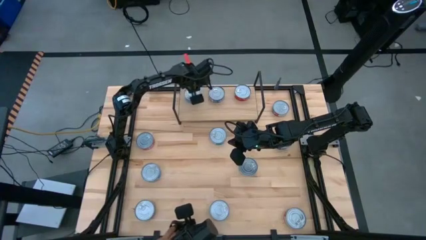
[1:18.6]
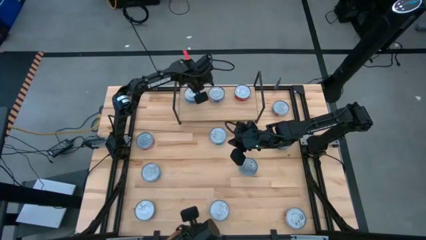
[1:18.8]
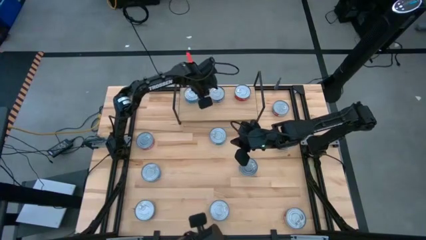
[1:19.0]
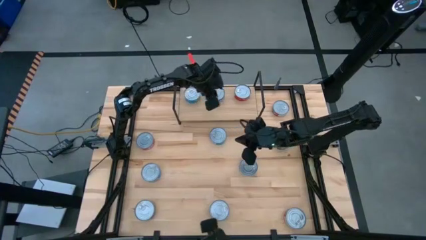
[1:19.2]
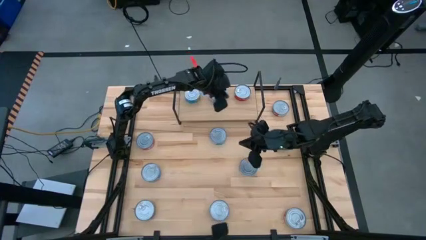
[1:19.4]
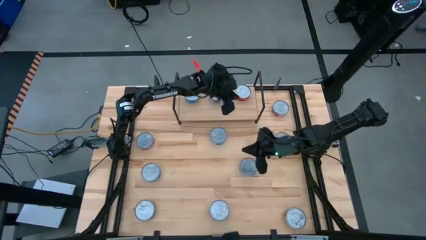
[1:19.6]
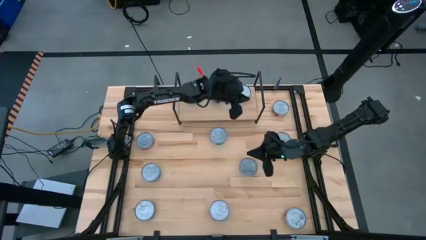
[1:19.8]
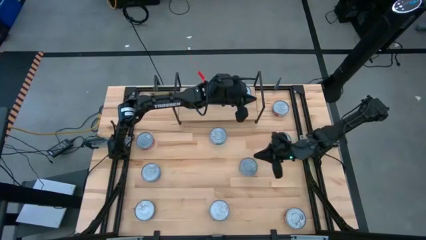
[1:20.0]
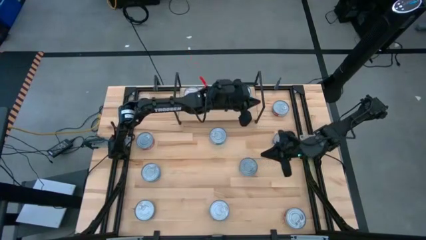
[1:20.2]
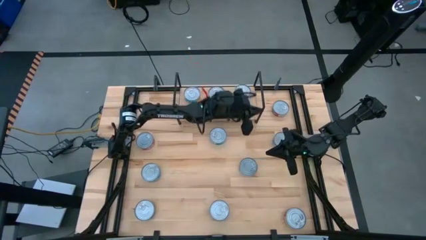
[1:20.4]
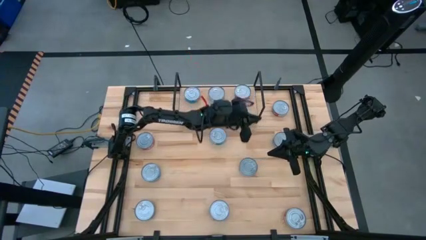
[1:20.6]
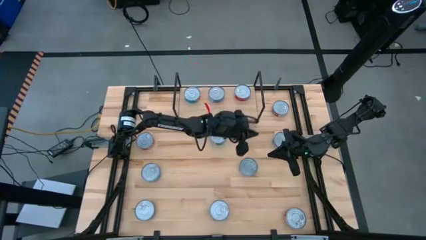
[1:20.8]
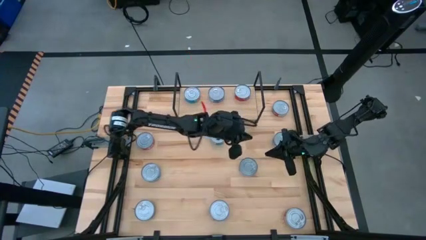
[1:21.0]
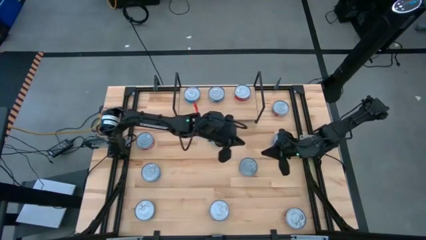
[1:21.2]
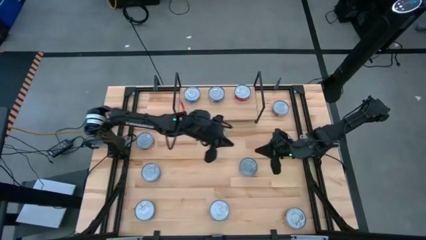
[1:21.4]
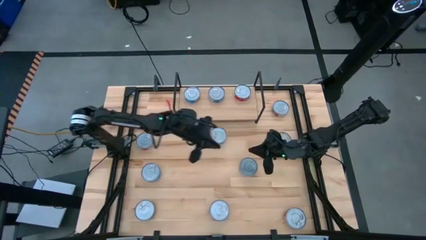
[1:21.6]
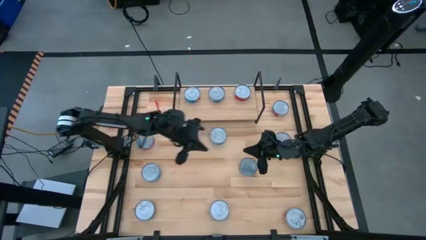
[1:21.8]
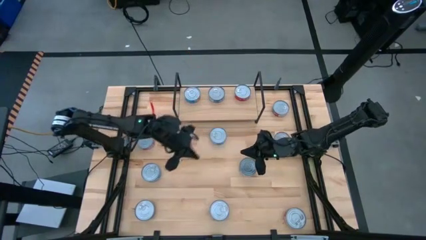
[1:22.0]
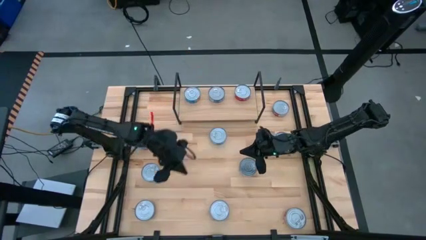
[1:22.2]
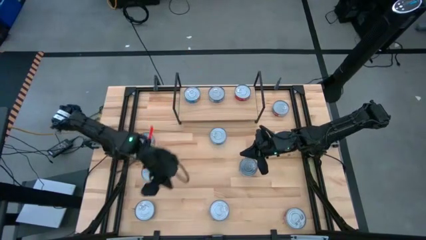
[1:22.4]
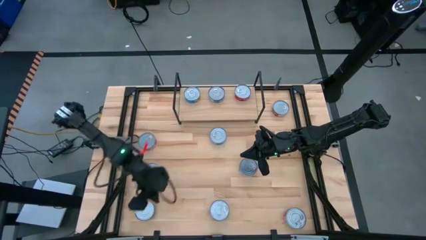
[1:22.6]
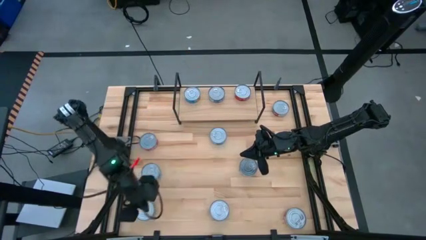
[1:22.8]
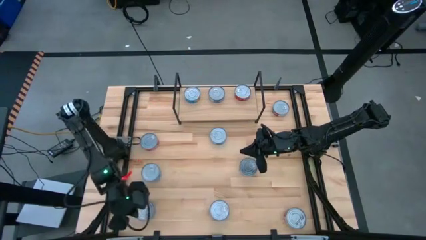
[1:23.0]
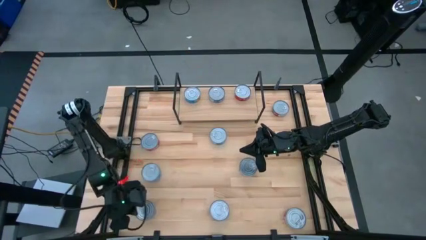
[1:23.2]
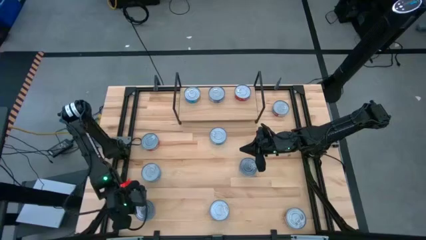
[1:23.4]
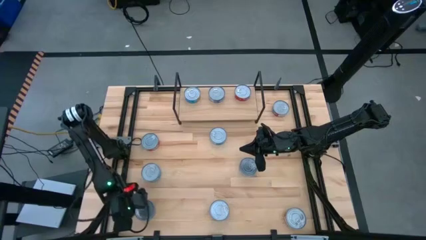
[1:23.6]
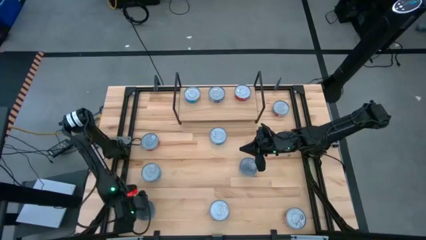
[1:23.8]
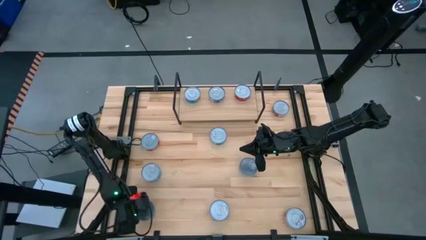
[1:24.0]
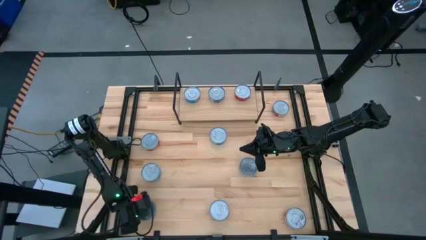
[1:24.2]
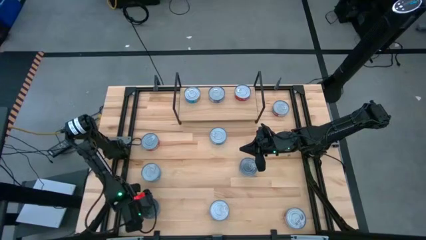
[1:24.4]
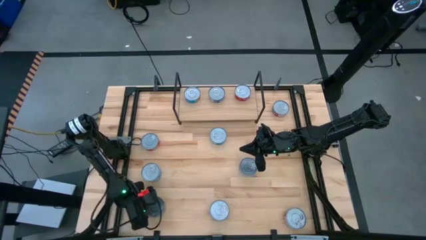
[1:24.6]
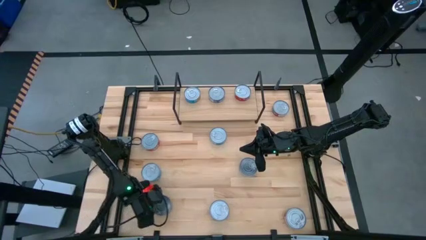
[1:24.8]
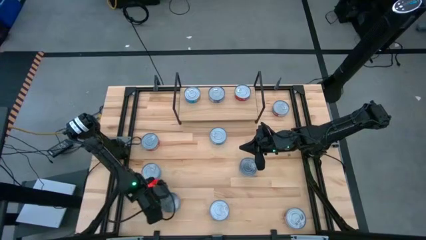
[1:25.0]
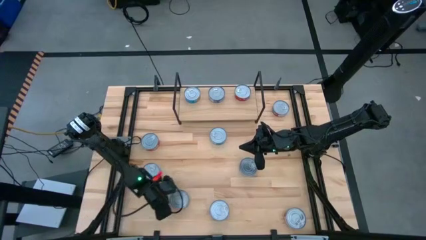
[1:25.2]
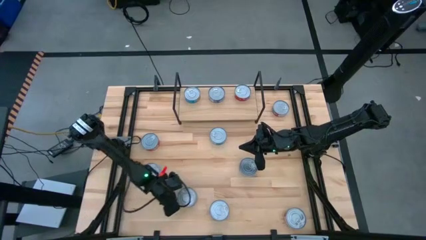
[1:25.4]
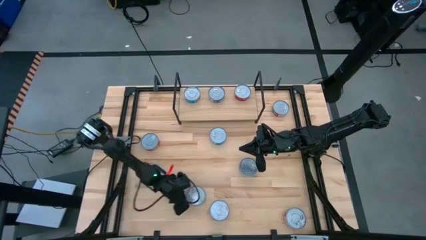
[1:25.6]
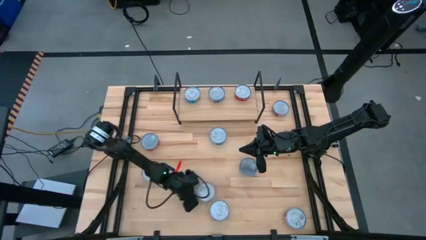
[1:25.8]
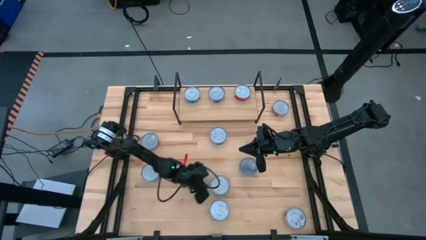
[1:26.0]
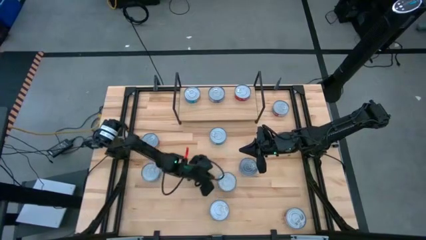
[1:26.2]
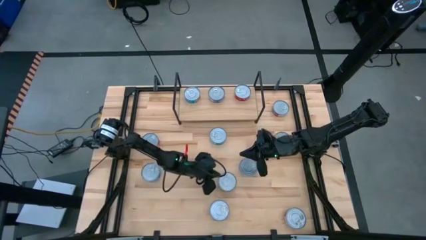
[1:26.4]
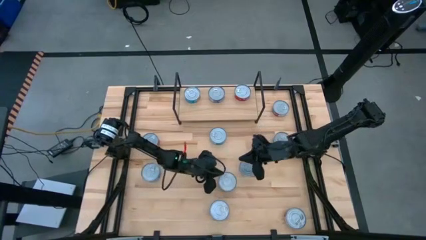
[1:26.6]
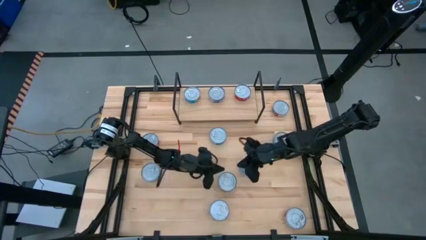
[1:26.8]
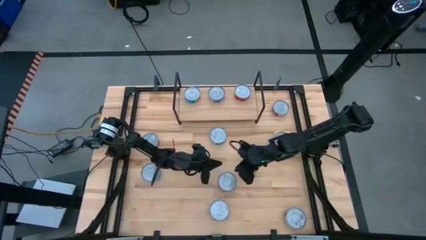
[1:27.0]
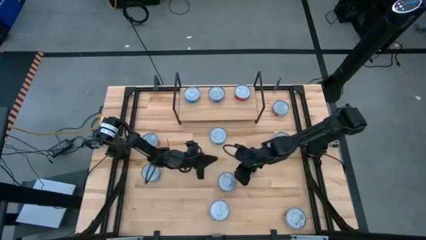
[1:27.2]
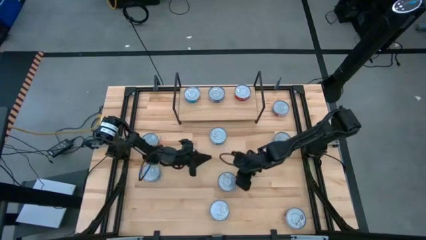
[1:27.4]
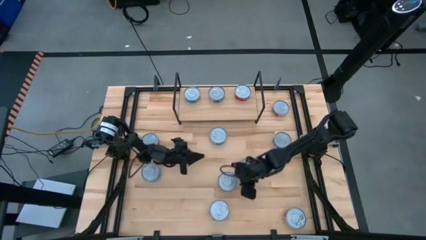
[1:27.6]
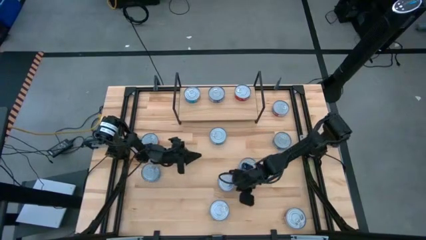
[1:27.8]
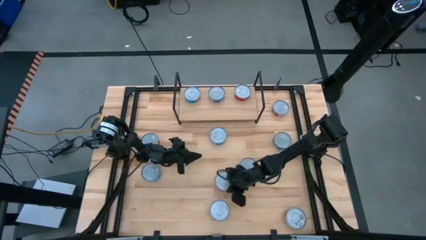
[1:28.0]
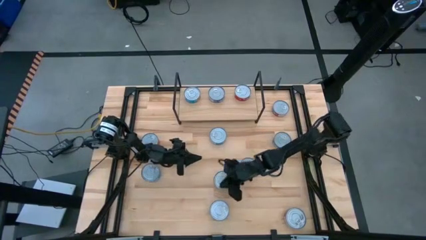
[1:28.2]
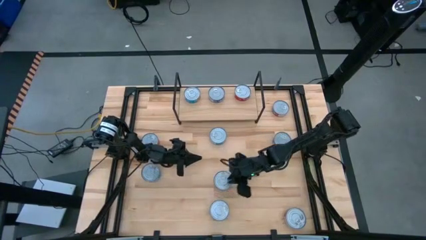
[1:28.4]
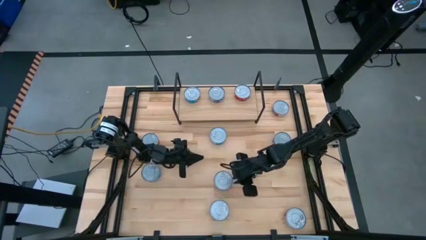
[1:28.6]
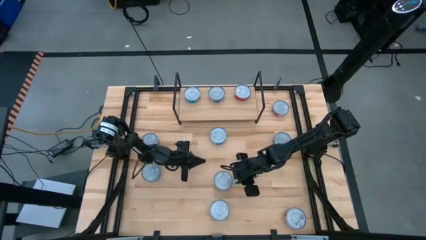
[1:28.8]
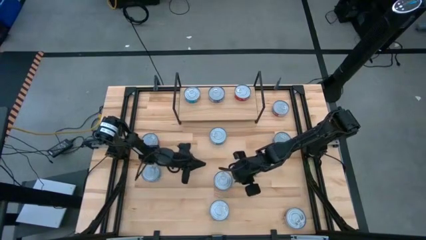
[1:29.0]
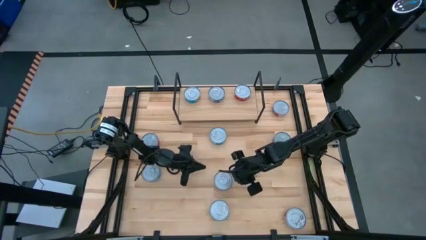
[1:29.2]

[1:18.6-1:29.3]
Task: Stack canned seafood by type on shelf
Move the bottom left blue tuna can to the center of the table

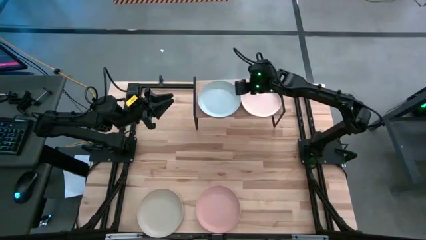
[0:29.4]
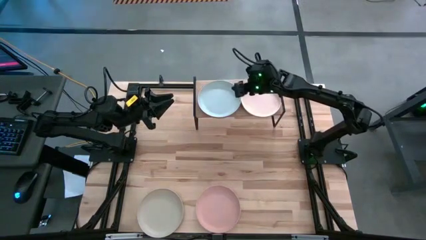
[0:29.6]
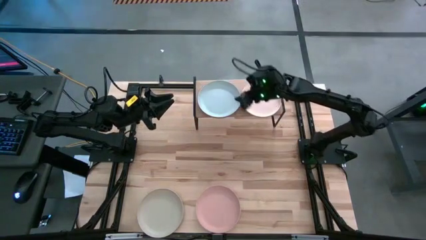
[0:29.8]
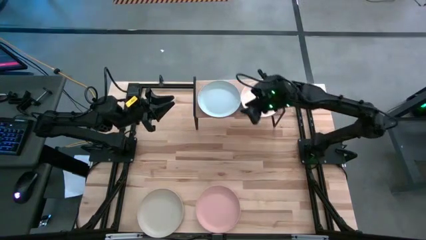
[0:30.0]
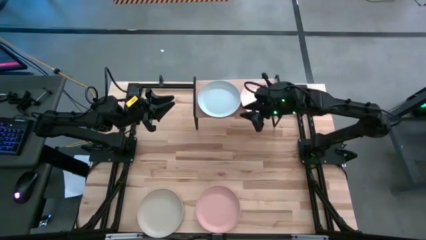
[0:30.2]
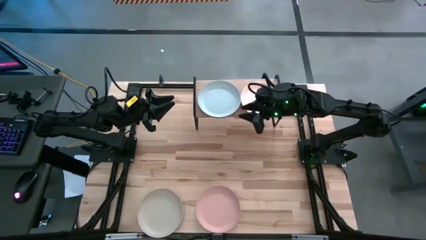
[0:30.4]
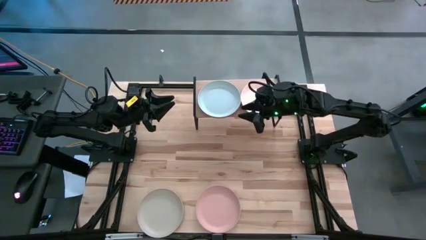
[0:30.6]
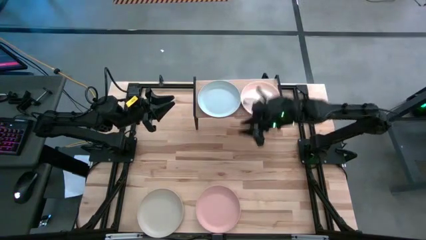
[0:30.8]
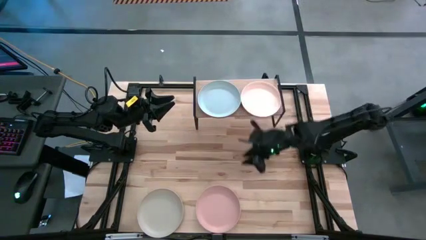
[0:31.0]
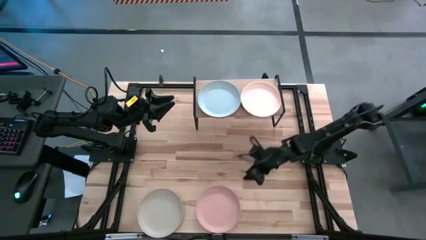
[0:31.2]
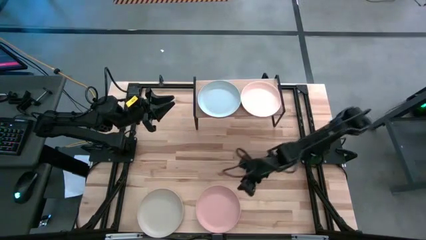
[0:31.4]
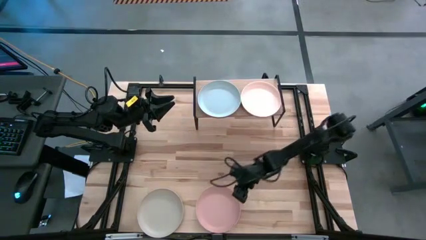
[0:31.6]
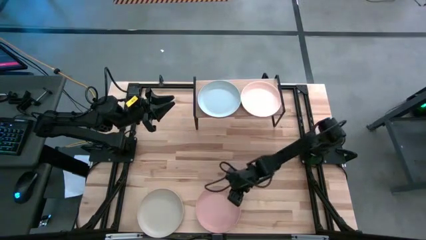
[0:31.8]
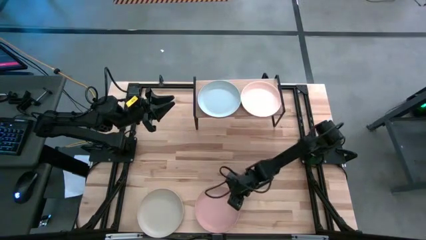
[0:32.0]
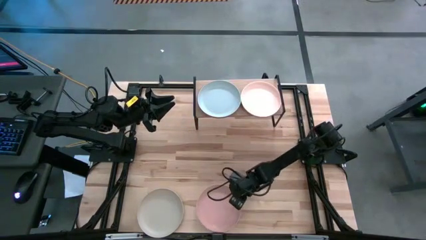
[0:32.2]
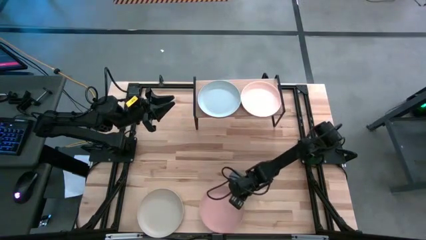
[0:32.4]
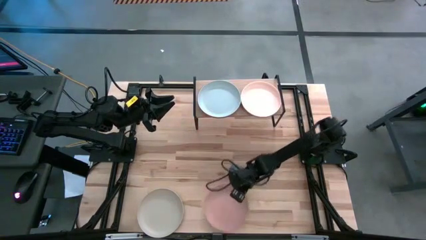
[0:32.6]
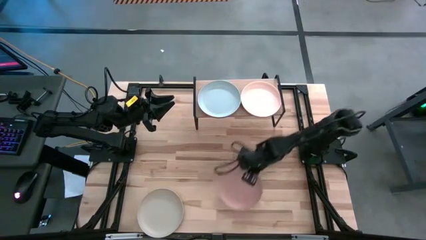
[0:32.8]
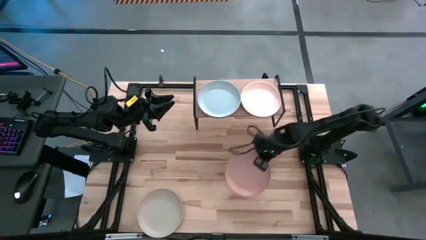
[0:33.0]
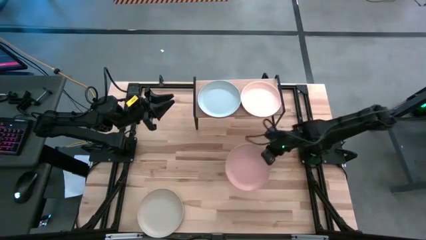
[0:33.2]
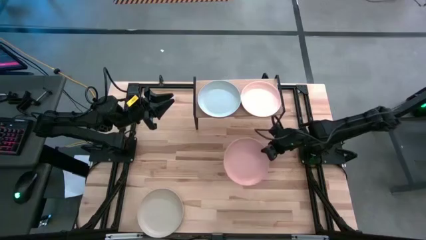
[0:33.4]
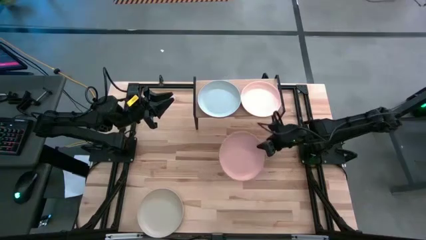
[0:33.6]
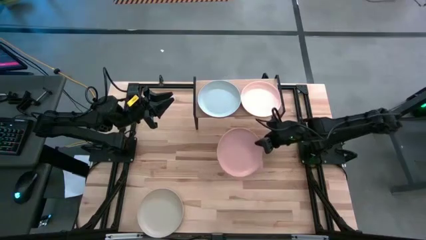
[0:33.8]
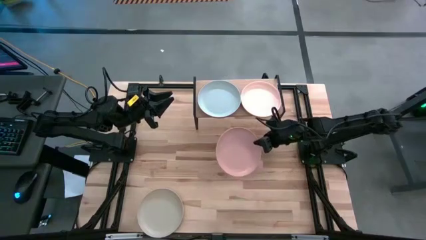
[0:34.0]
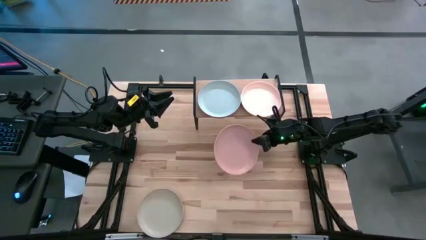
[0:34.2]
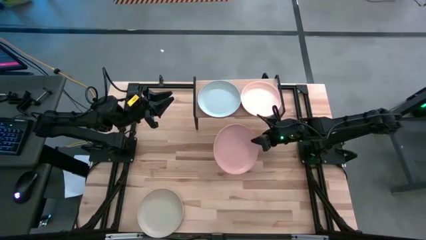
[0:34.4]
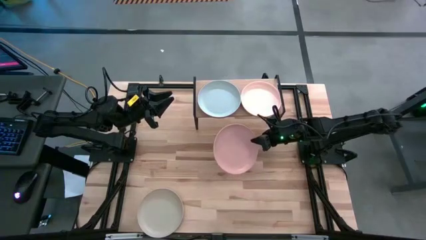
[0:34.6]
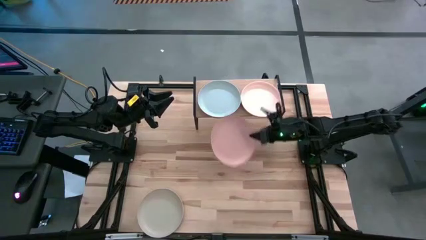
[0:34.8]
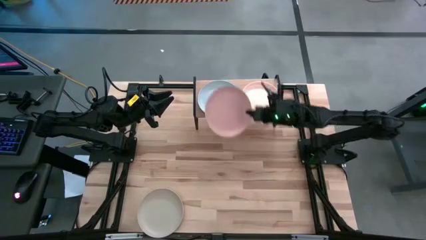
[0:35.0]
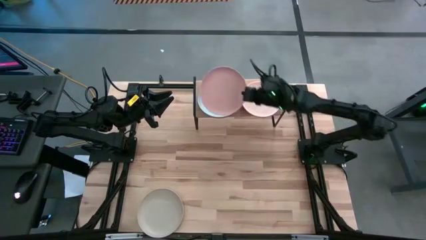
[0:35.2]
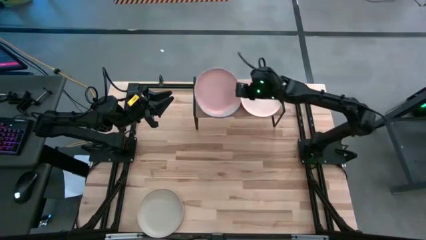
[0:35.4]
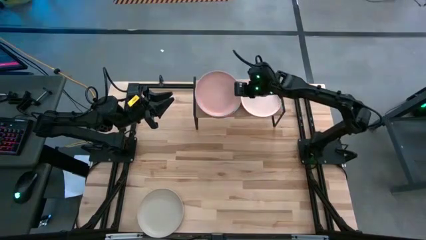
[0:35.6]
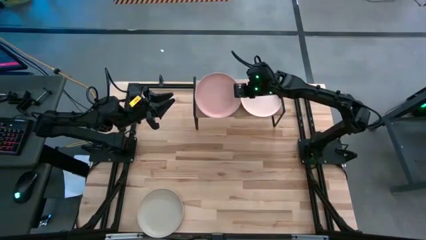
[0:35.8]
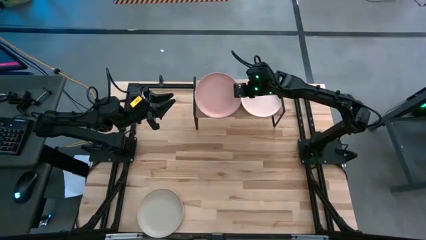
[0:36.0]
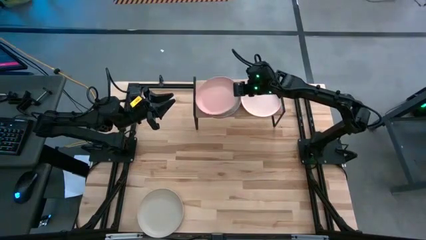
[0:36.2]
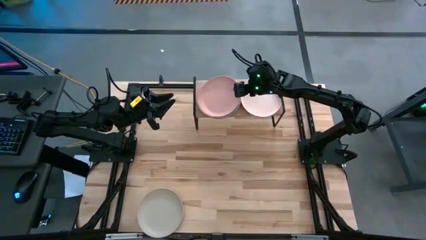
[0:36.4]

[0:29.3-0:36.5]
Task: Place and stack plates onto a shelf
Stack the pink plate into the blue plate
